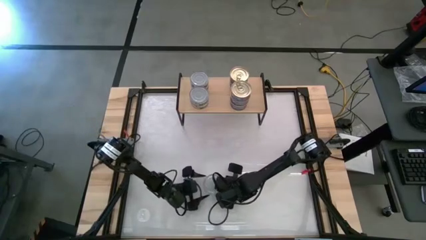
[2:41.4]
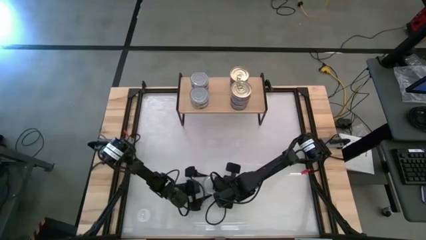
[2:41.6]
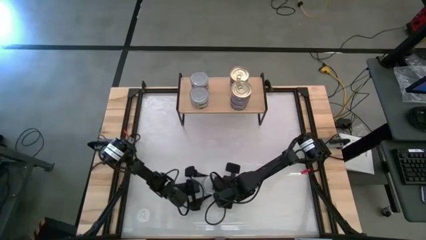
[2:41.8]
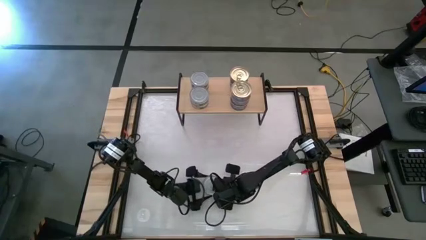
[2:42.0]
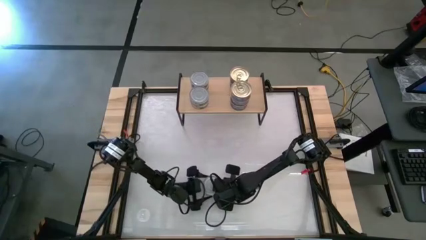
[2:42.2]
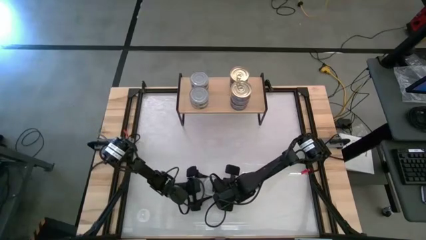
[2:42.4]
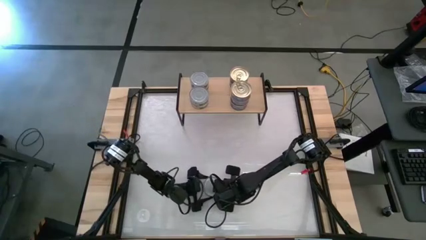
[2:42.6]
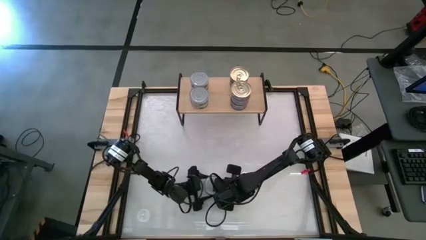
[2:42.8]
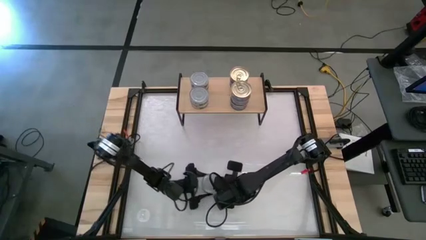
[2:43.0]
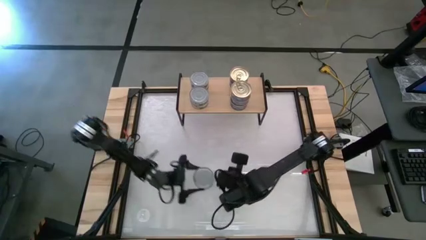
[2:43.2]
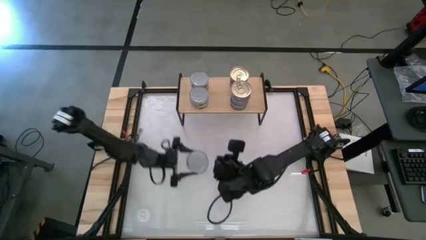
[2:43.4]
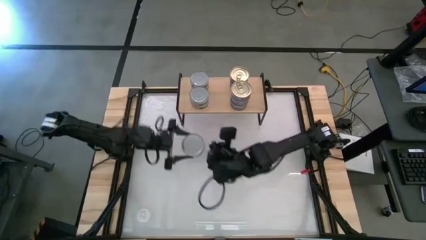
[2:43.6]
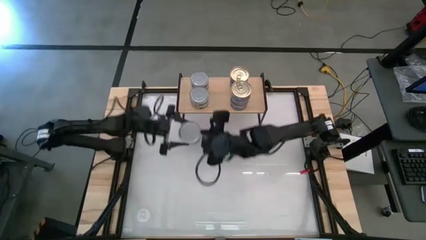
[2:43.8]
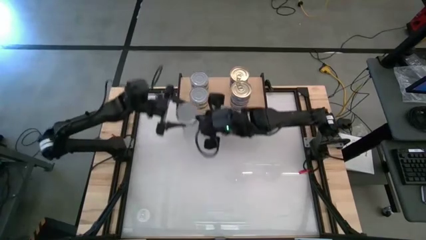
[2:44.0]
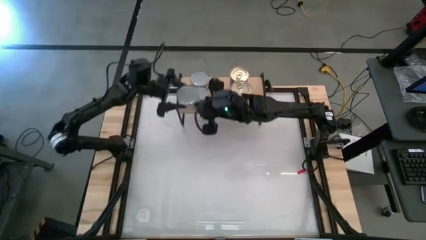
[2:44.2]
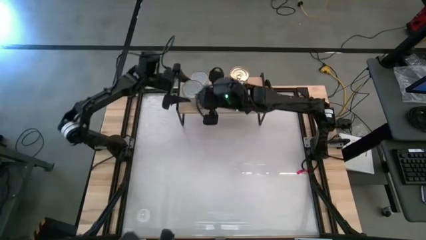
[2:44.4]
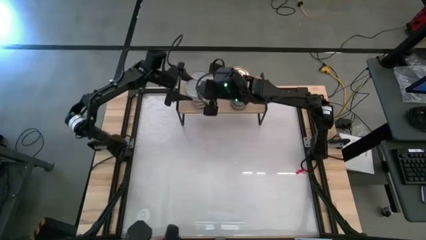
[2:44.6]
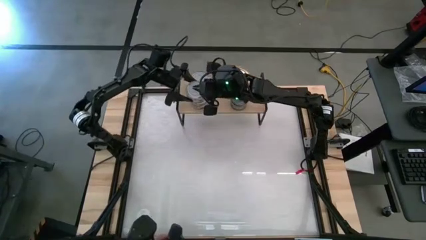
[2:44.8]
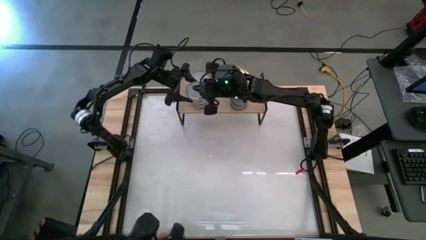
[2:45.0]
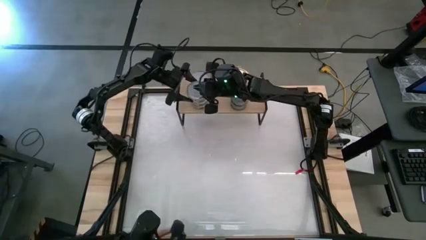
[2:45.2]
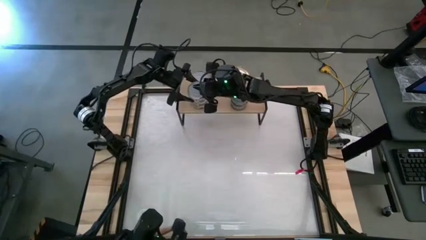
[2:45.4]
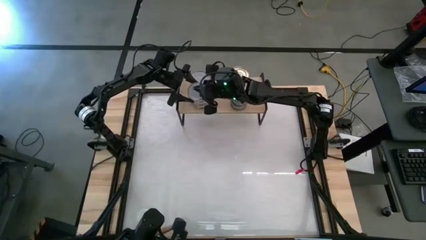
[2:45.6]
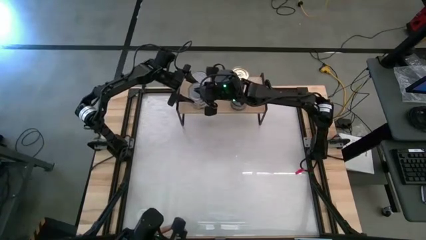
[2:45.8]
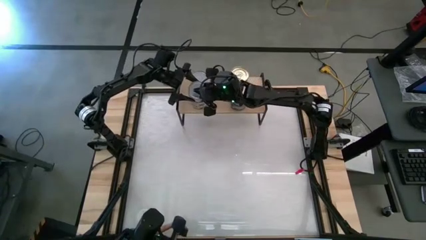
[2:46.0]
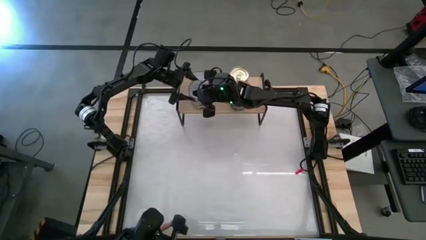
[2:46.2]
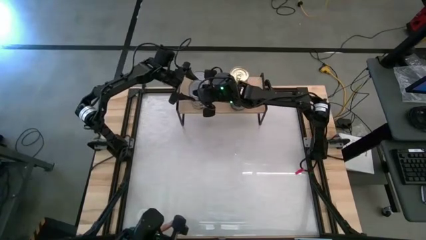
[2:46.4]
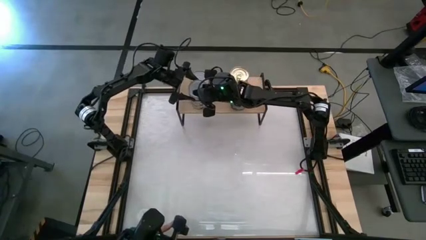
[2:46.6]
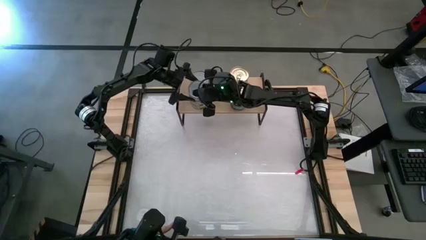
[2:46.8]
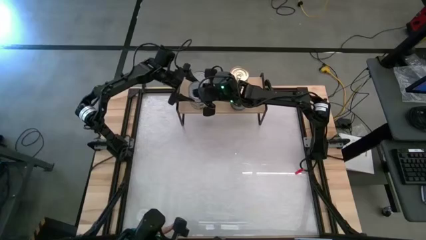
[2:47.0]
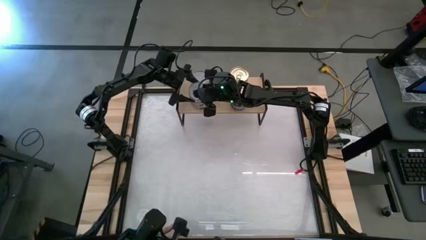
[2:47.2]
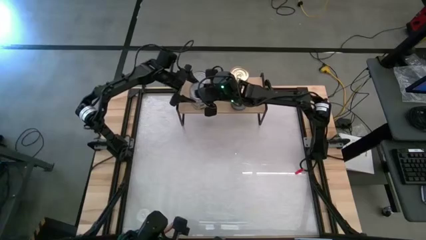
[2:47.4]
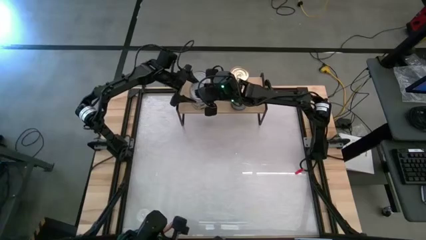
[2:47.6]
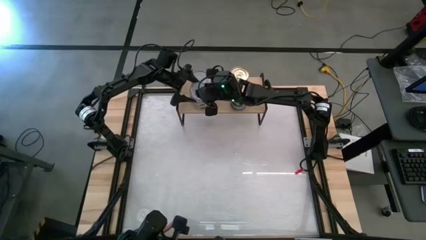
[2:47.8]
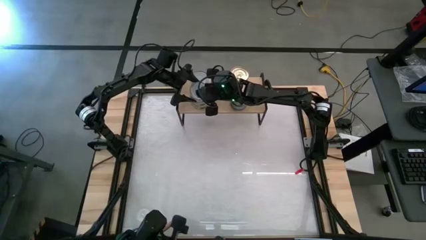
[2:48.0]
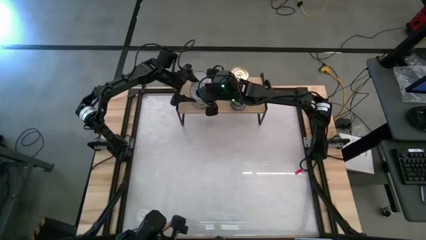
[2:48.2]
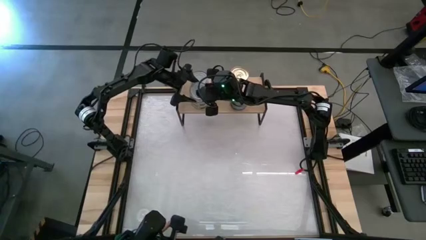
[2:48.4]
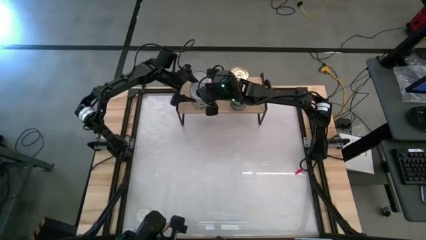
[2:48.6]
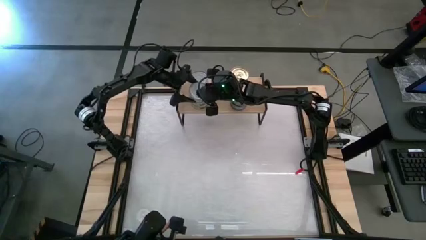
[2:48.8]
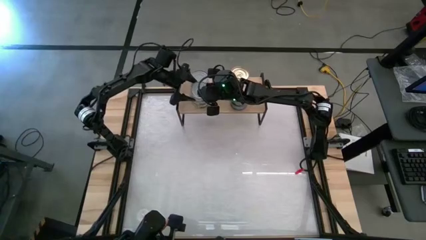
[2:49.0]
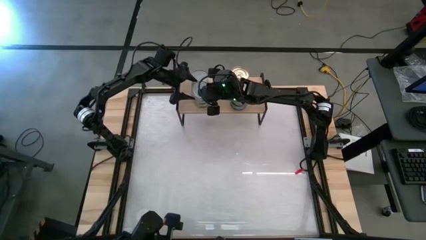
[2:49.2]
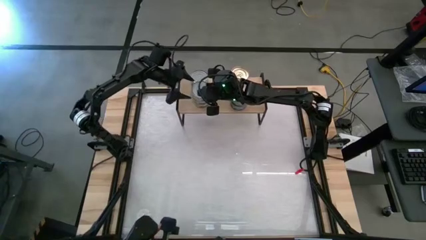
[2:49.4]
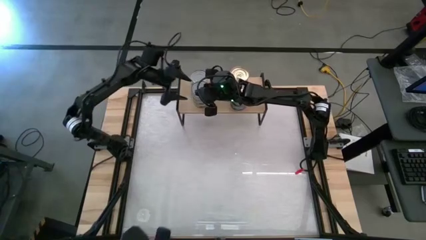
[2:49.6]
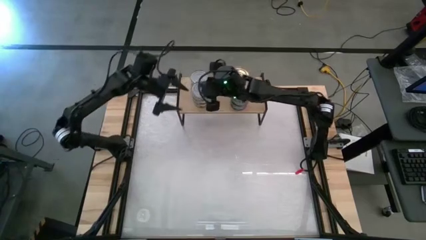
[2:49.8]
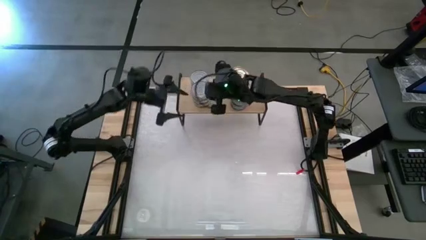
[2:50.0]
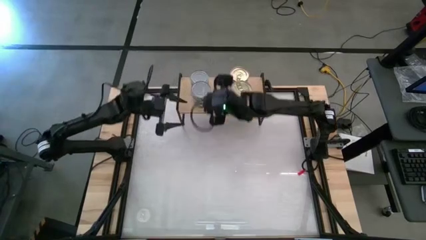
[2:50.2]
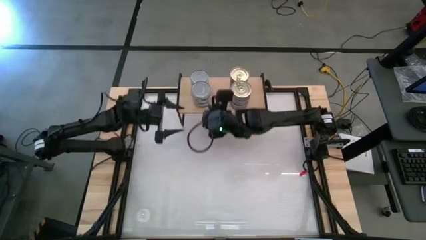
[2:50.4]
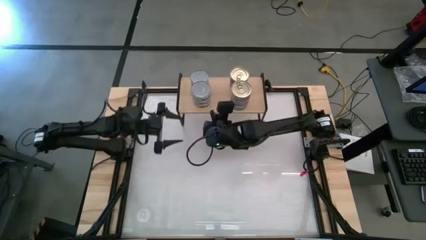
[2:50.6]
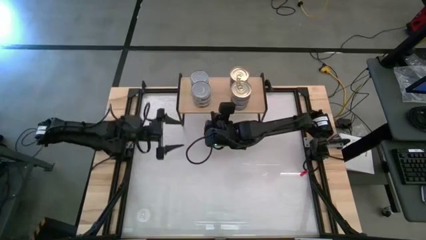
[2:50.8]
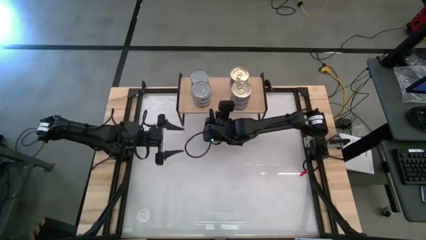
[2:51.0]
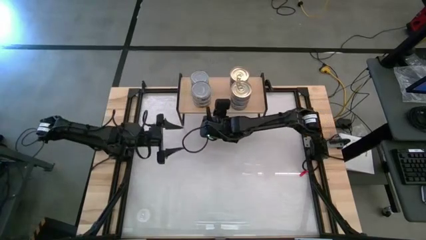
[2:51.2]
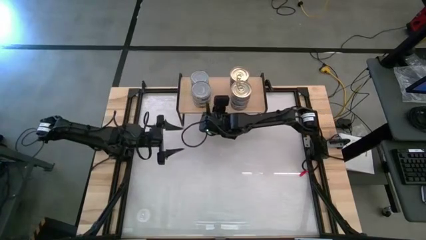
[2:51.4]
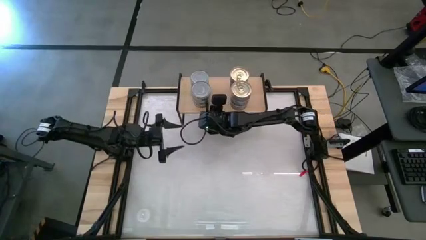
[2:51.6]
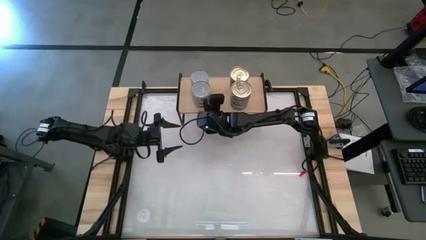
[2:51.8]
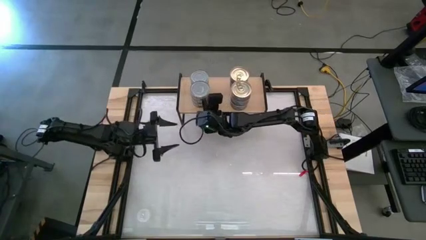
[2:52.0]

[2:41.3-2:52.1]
Task: Stack canned seafood by type on shelf
Stack the green tuna can on top of the other green tuna cans on the shelf

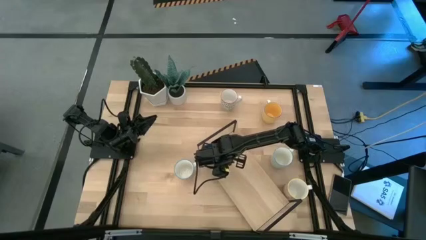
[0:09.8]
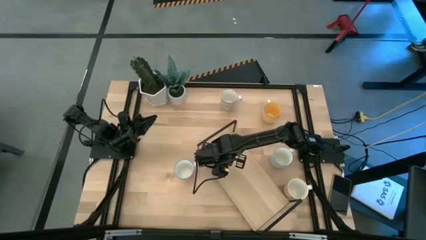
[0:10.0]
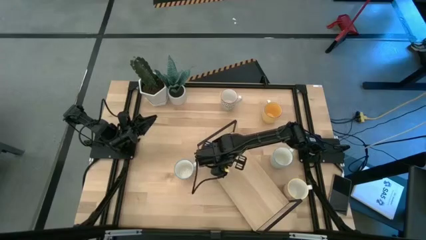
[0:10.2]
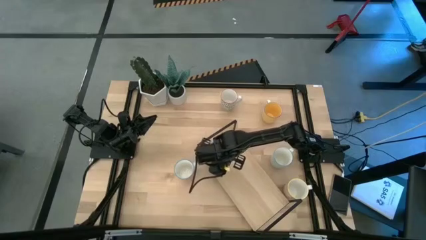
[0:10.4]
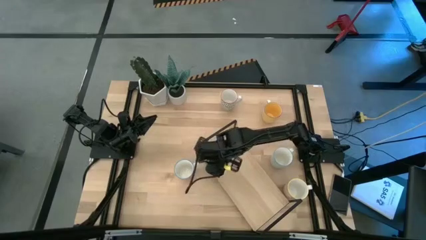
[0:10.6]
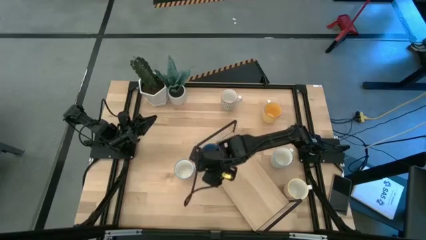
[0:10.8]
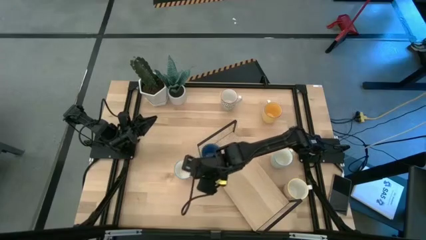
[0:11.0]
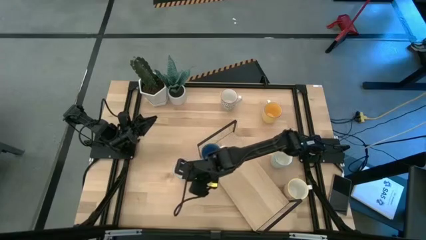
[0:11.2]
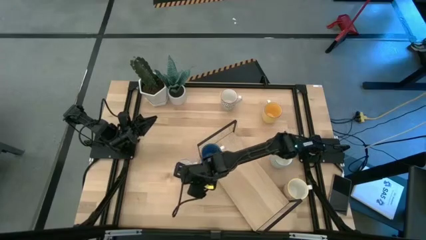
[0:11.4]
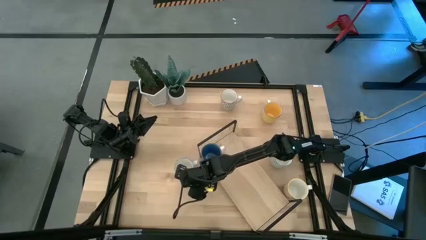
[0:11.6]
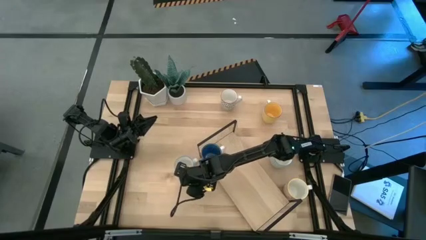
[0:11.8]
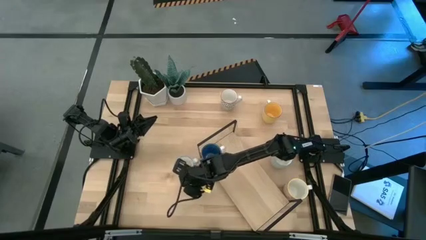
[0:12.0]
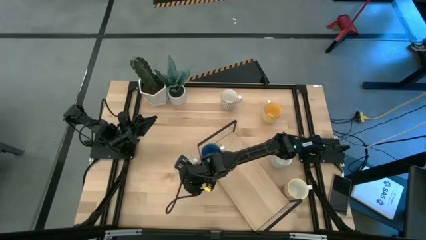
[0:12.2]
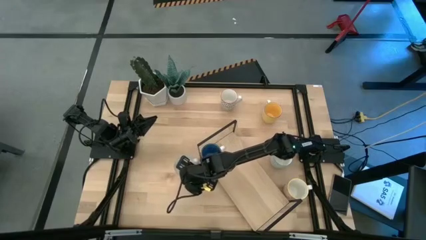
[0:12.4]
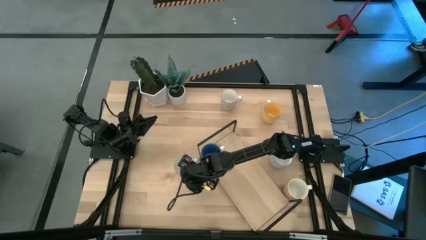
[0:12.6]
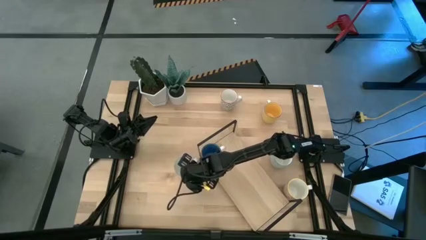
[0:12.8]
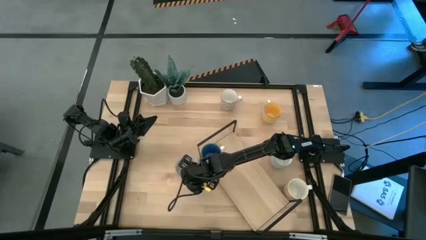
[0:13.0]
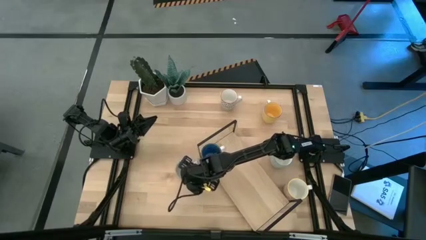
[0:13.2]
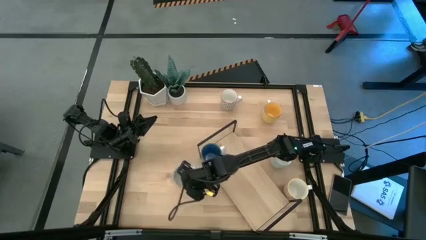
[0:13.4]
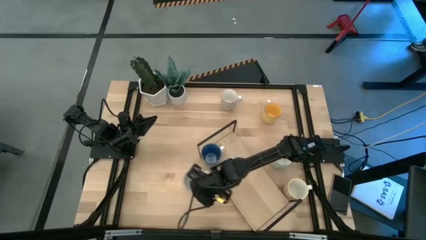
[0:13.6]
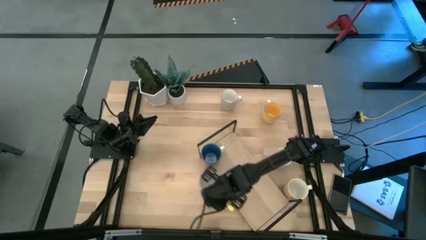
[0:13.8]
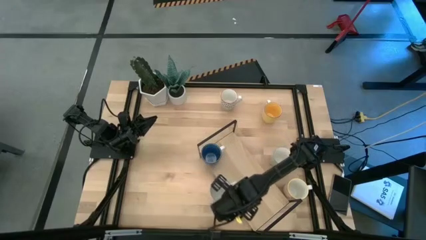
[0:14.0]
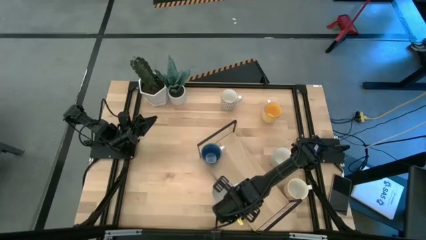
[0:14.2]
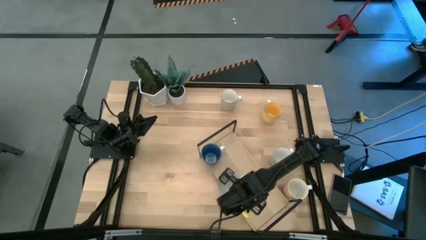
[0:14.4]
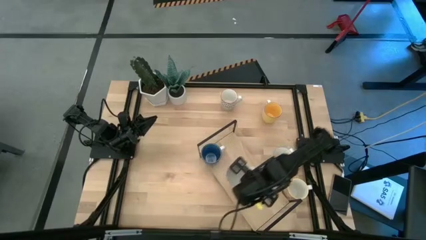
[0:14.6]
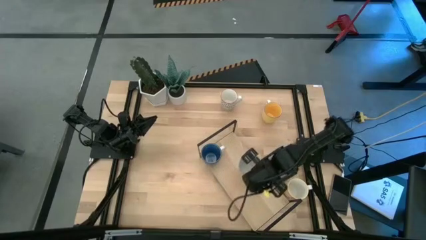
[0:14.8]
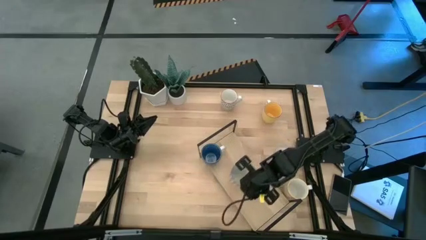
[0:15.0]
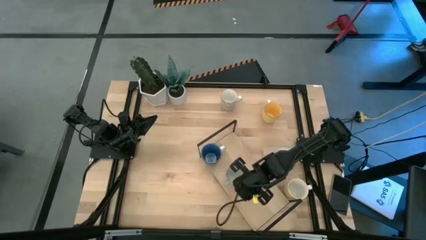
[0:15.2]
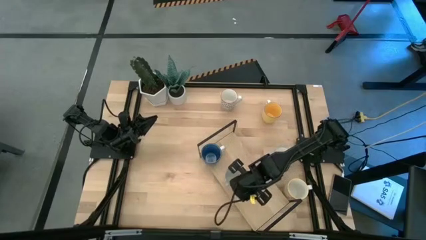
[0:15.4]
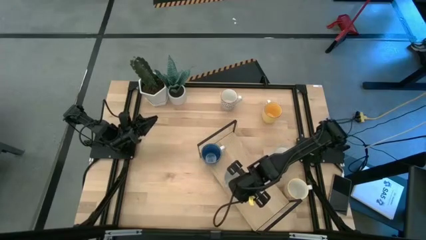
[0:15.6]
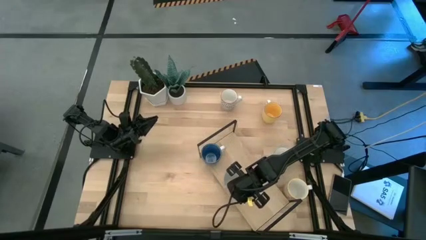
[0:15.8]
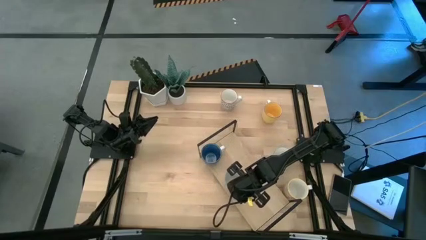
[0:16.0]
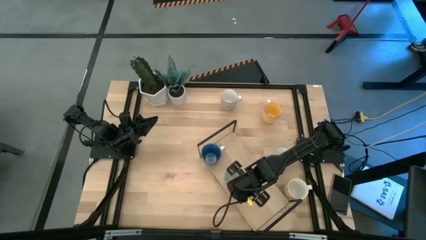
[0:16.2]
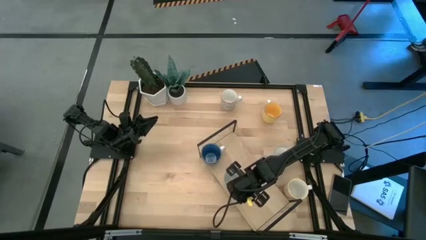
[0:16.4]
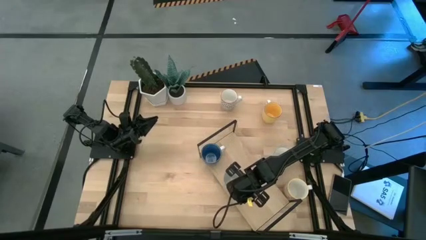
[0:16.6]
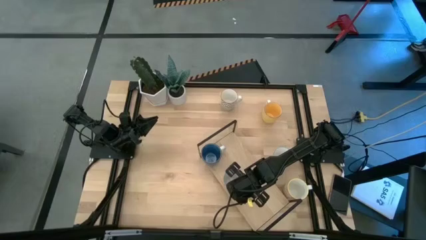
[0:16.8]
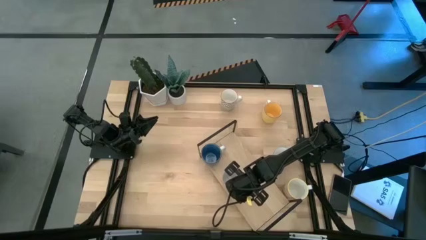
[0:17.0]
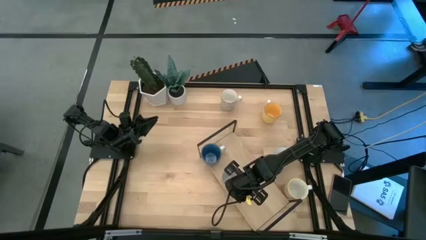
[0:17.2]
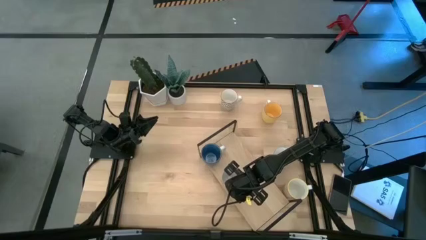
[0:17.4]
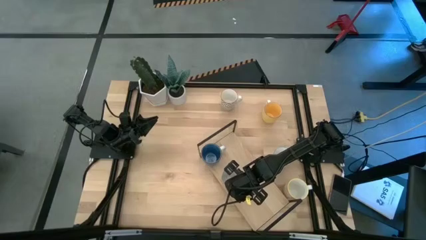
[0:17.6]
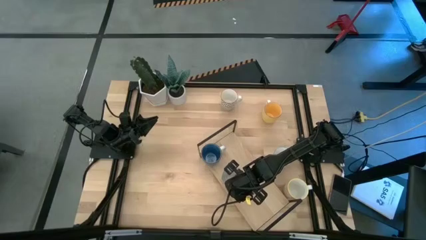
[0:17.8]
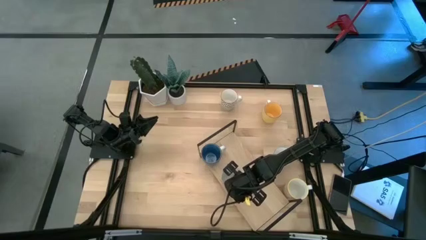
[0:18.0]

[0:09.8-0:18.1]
Task: Place coffee mugs
Put the red patterned mug on the shelf
